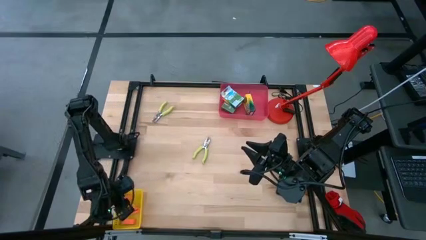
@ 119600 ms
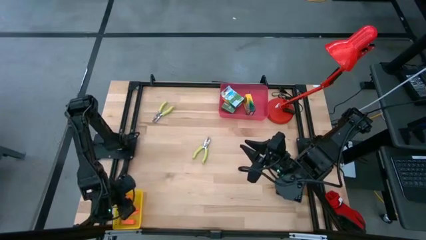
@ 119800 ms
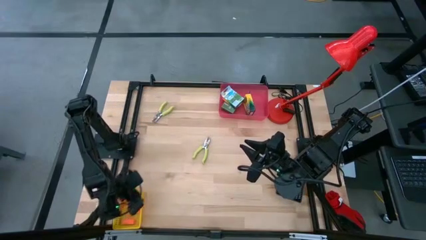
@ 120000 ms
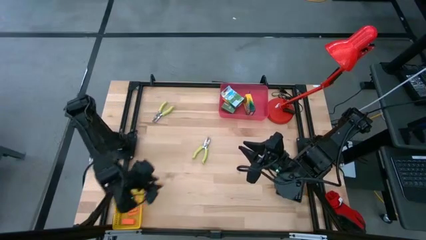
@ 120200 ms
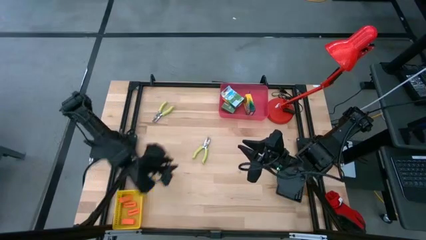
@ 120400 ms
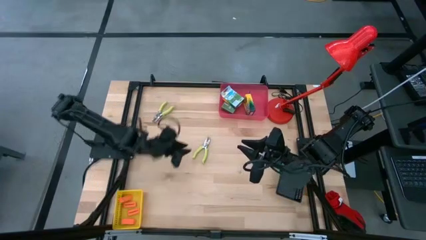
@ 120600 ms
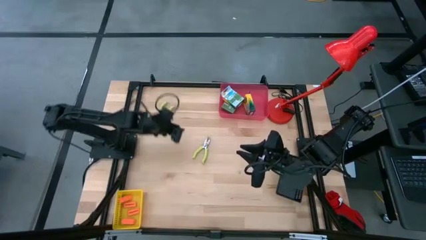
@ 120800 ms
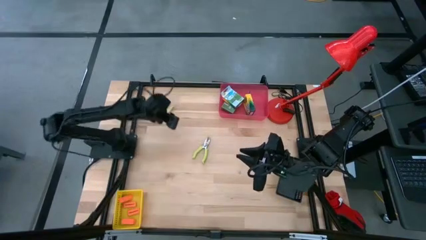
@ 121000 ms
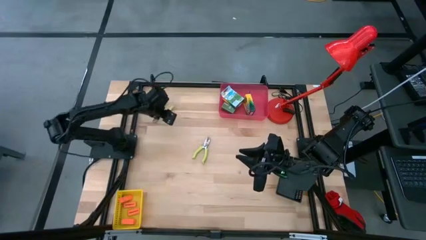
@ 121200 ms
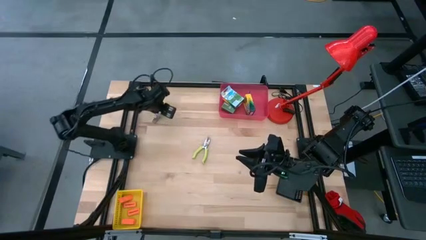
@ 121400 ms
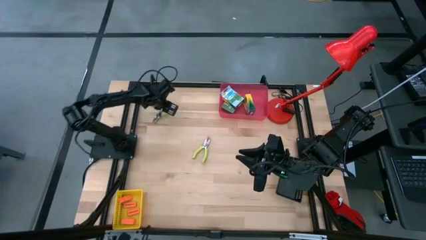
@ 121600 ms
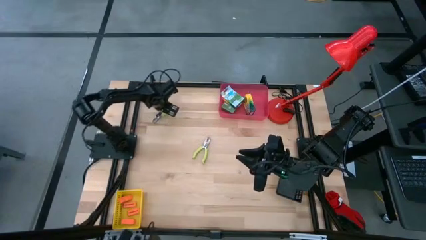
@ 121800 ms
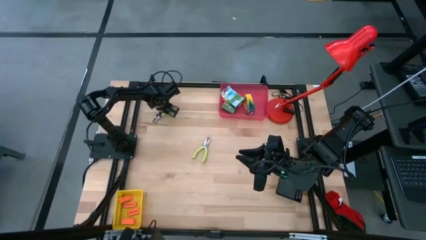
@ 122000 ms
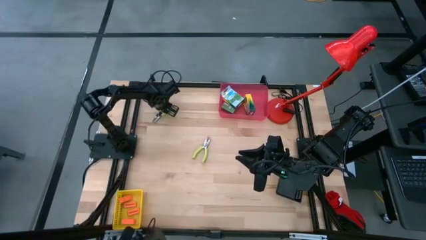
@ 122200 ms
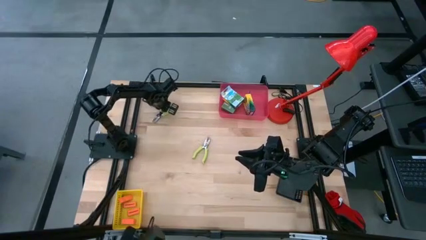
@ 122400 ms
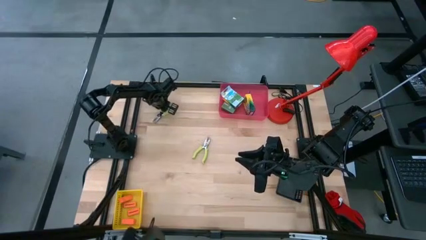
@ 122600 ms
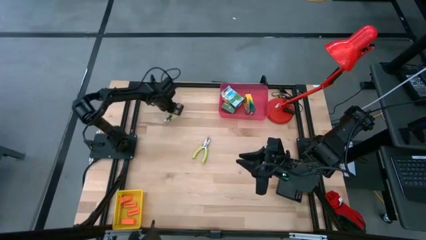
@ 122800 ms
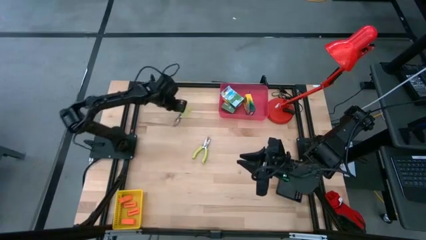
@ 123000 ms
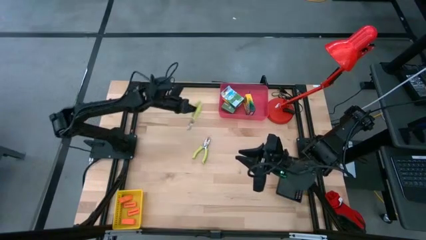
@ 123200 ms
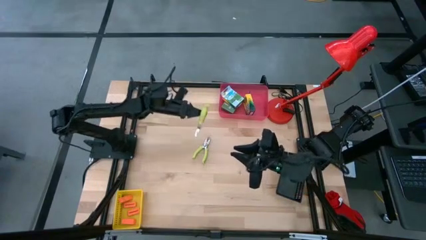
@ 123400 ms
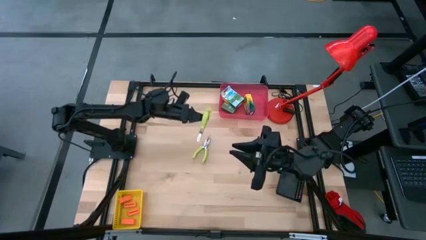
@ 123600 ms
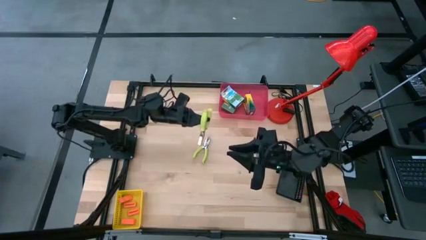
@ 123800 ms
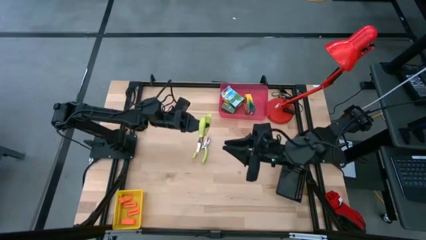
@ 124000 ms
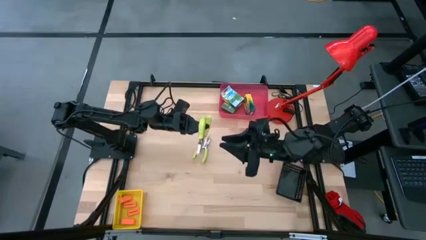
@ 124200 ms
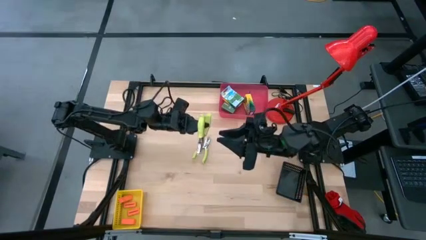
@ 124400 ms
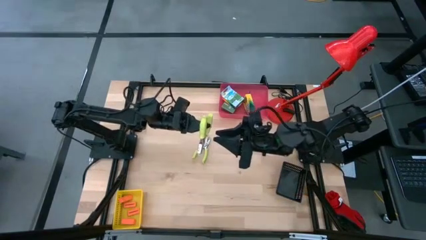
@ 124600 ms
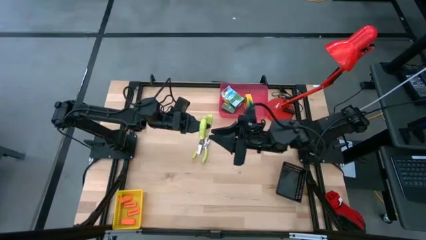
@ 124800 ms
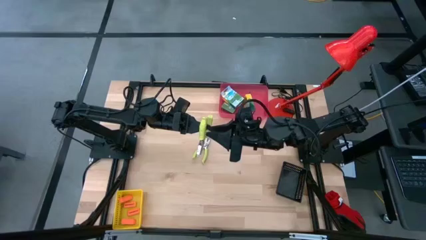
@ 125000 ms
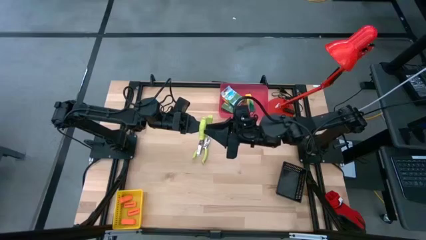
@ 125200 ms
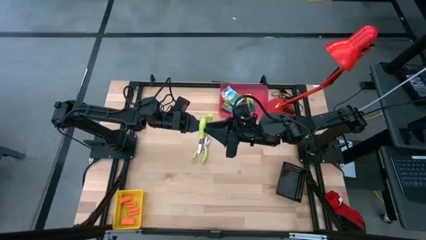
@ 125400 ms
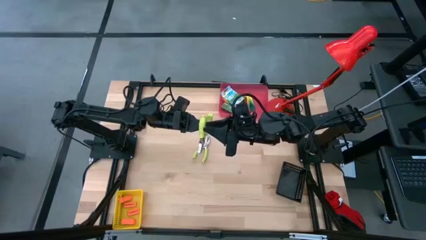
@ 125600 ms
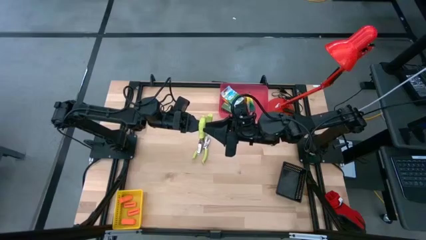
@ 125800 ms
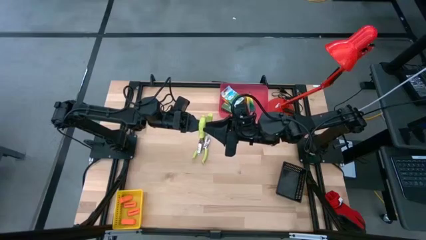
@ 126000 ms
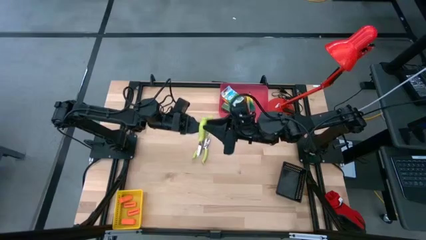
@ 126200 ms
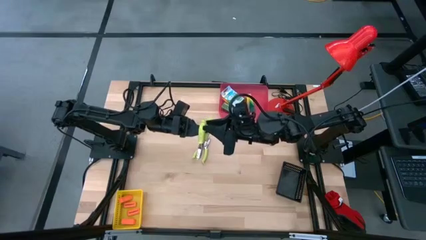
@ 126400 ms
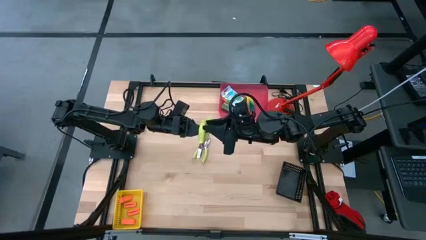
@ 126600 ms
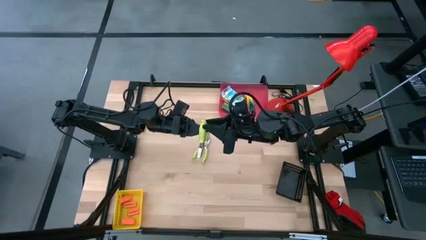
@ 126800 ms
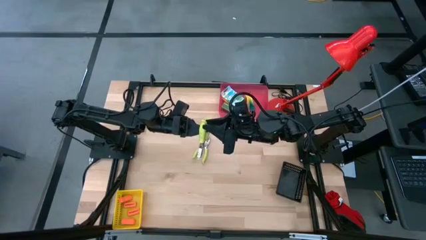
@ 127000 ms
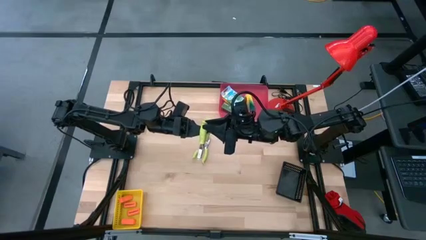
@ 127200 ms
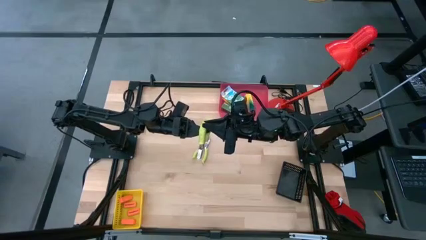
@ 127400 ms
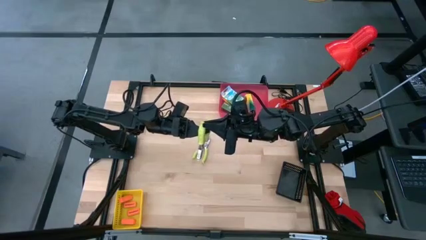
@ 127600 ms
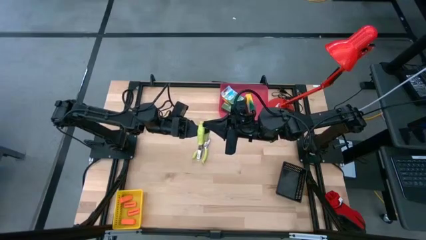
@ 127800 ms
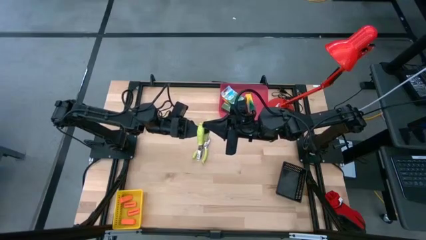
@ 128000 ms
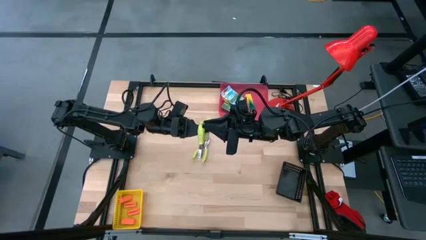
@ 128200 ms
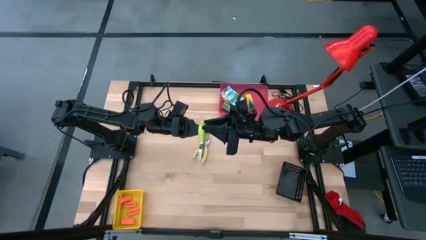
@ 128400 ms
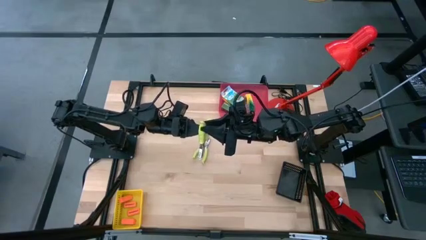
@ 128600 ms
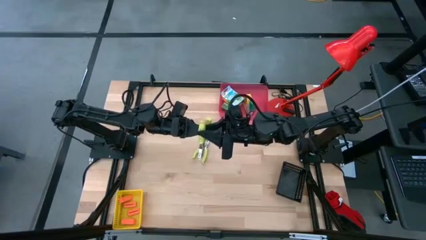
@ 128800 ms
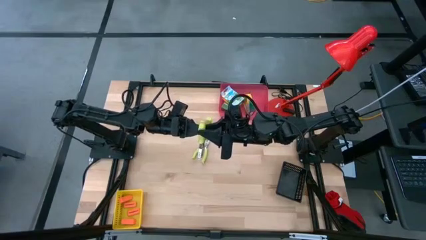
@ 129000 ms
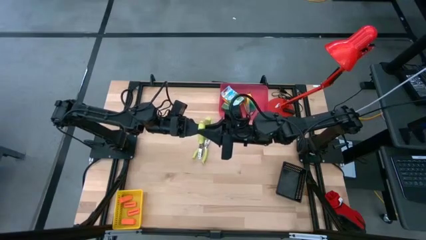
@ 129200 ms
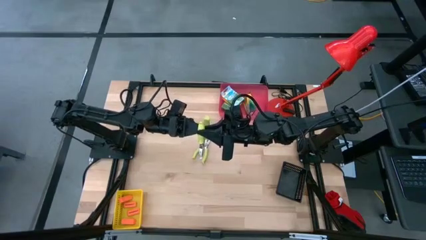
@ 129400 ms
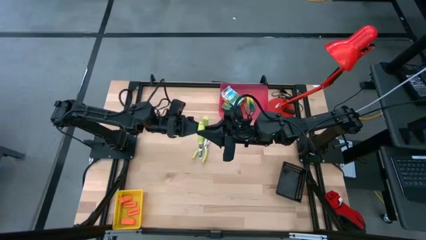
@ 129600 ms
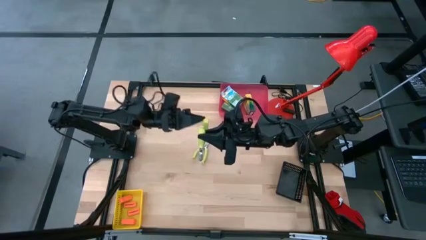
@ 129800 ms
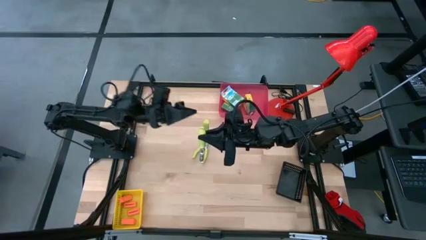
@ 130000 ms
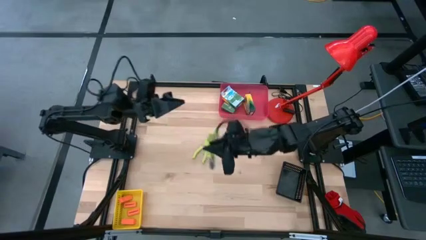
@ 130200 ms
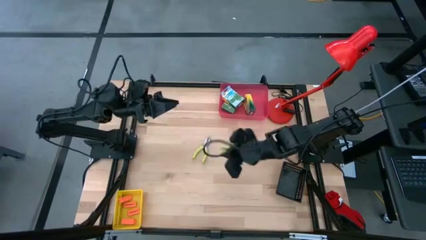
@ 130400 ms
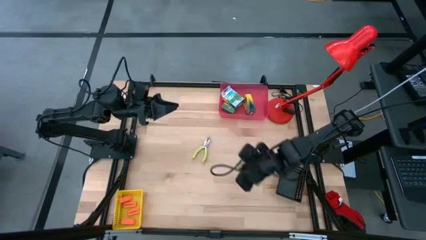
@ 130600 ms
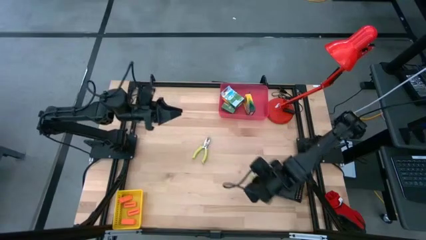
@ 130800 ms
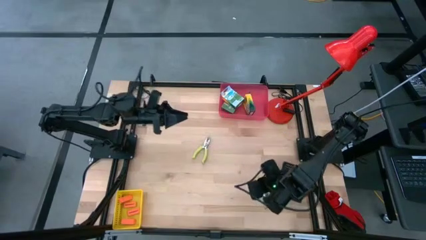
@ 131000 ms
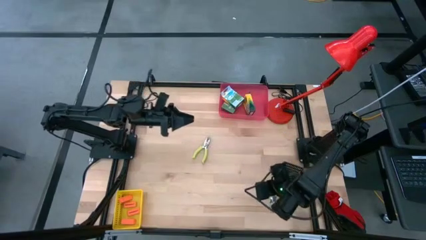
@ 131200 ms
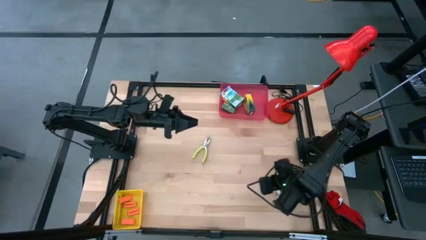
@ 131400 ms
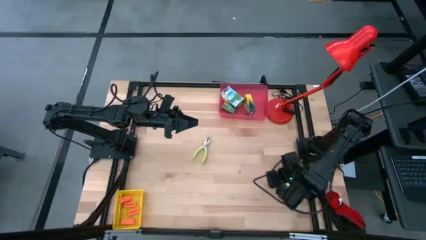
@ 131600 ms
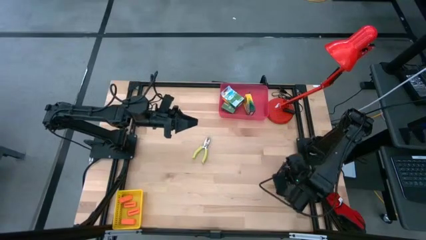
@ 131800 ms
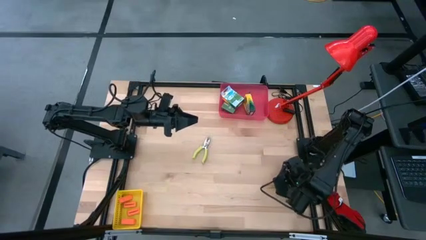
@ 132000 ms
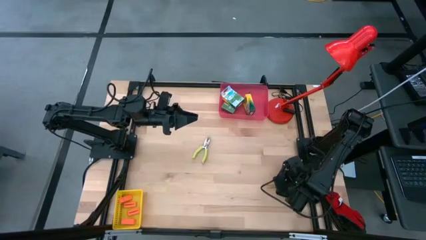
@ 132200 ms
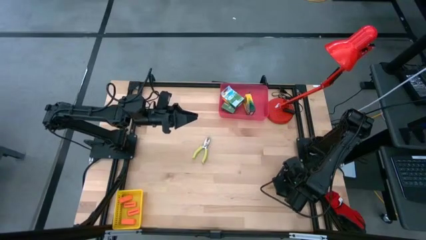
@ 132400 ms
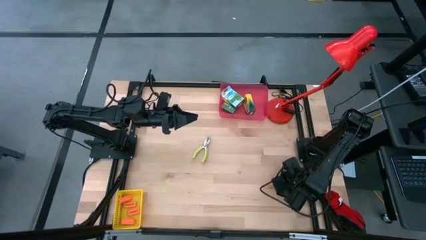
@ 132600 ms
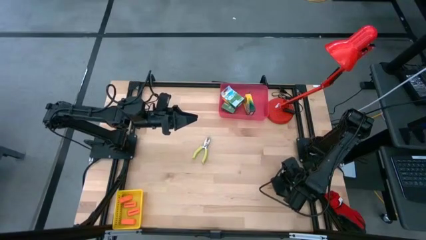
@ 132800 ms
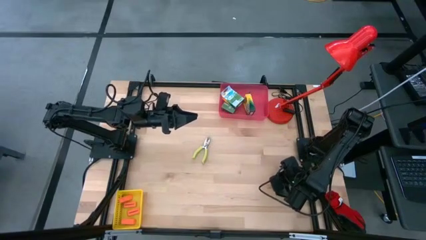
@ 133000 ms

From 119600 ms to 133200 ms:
Task: Pick & Place School Supplies
Put the light green hole puncher into the black bin

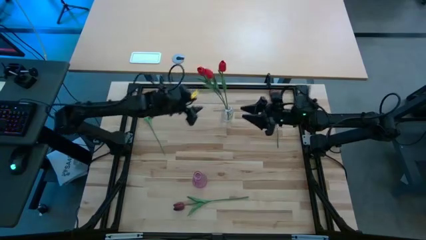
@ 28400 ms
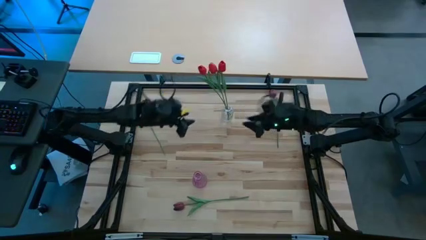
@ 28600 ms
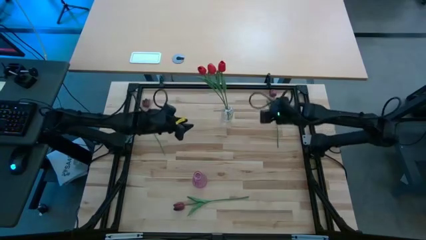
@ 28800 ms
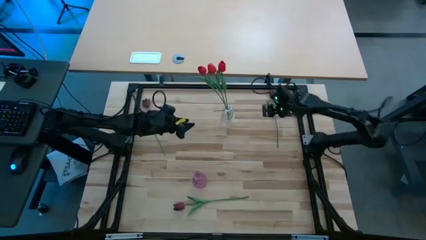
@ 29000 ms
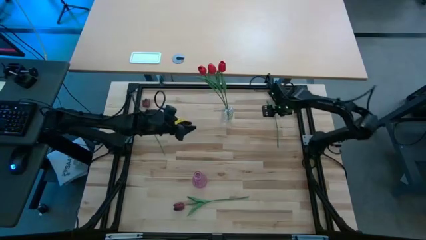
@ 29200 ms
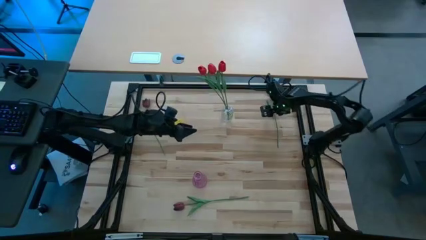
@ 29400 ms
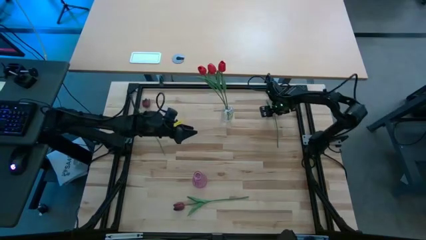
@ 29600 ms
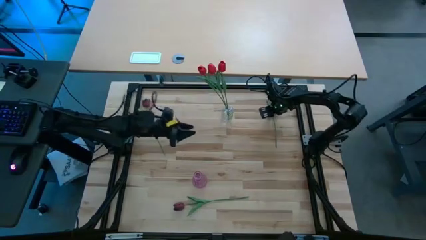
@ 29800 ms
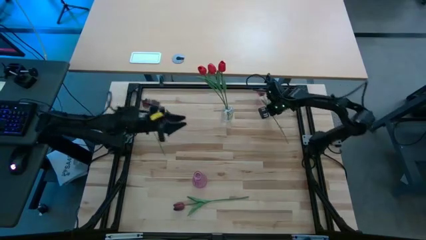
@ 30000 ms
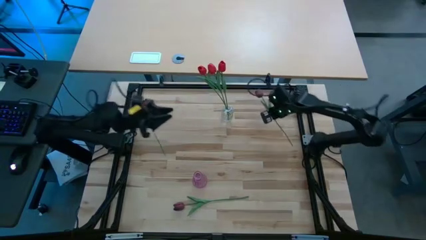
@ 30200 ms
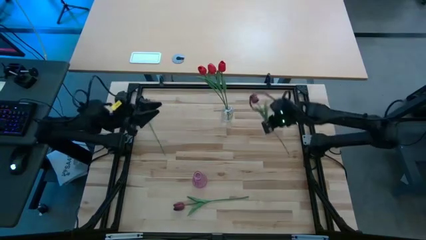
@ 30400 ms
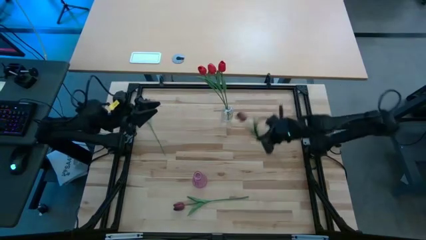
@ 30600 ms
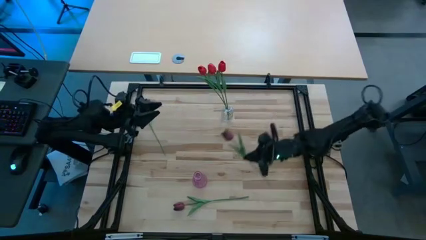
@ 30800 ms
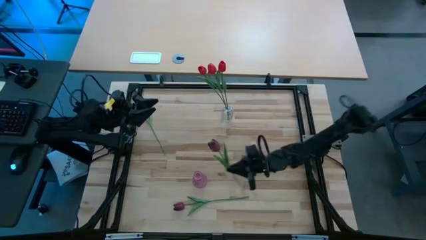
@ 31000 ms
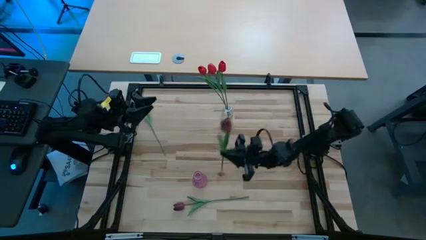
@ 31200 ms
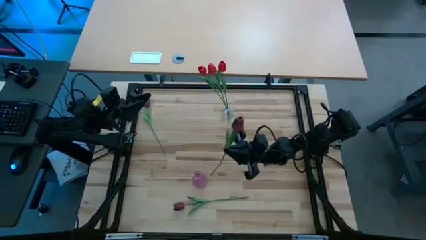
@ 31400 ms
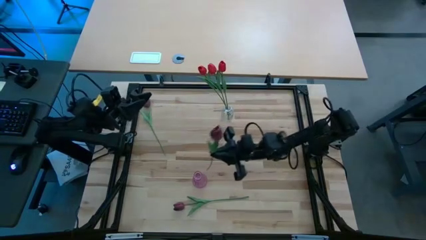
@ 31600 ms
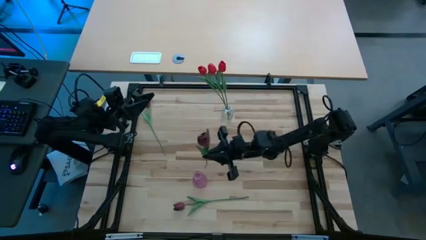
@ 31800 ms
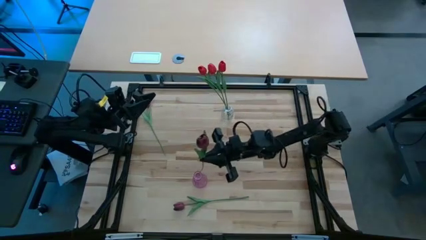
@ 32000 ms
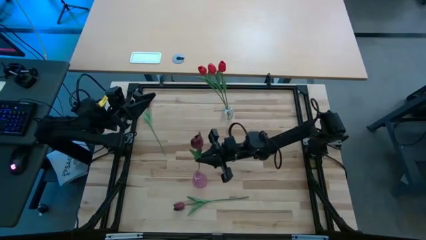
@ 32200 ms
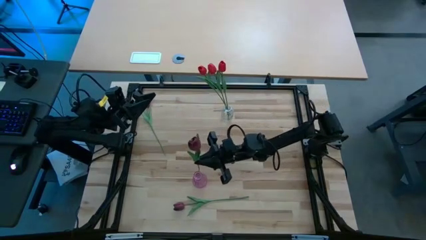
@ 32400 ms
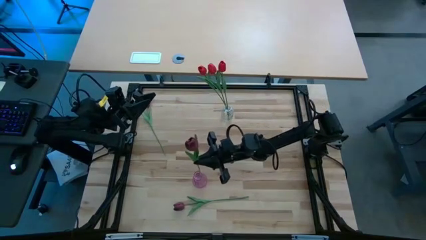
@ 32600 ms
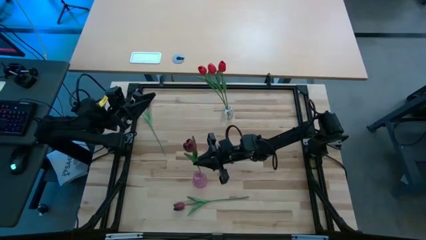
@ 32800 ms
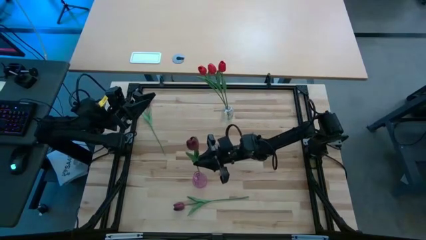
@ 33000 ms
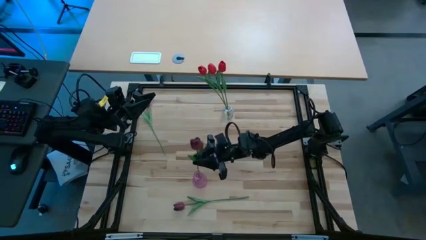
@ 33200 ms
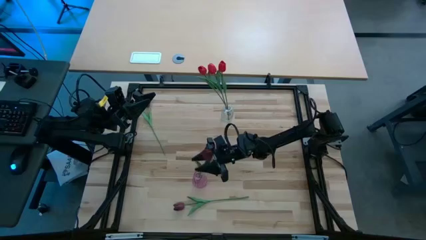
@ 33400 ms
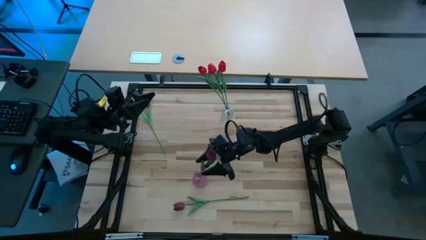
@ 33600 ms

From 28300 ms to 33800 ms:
Task: Sort flowers into vase by color
Put the top right dark red tulip into the violet flower vase
